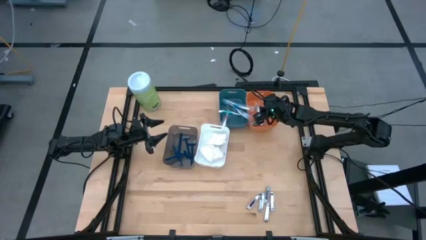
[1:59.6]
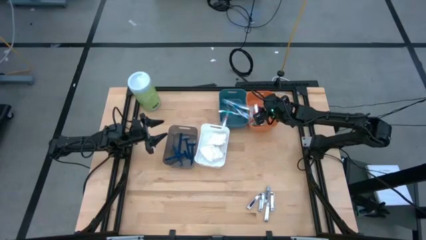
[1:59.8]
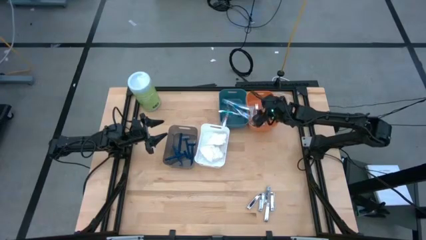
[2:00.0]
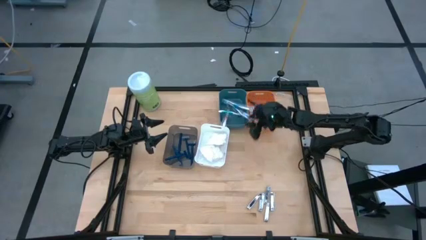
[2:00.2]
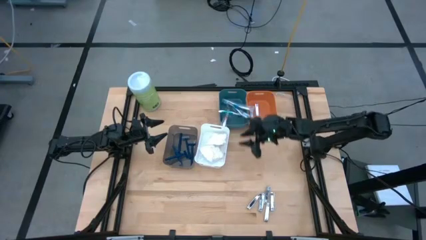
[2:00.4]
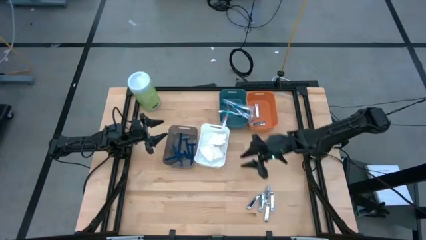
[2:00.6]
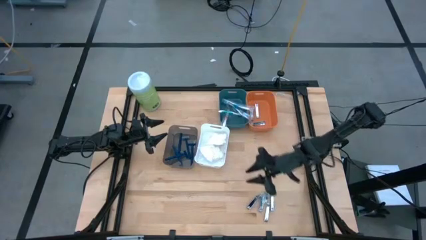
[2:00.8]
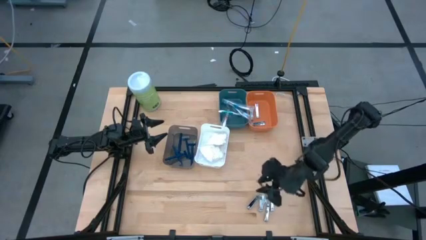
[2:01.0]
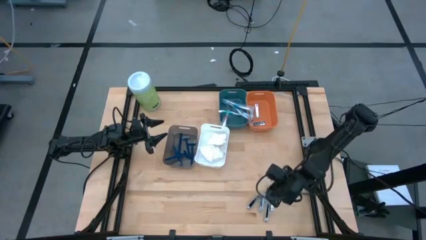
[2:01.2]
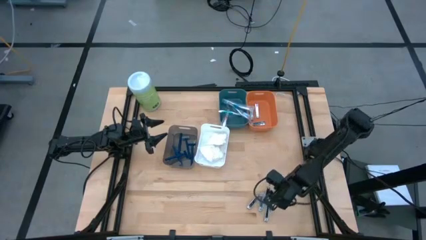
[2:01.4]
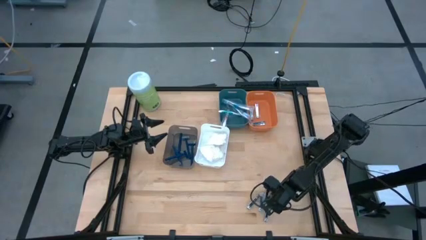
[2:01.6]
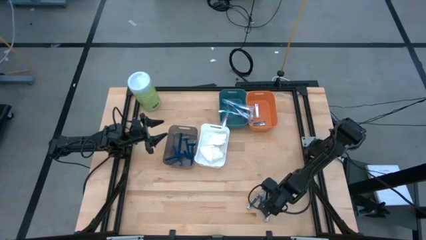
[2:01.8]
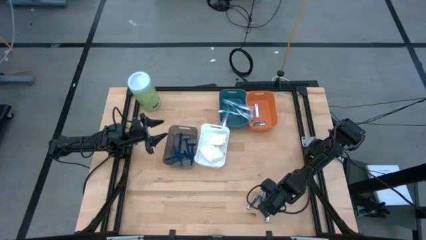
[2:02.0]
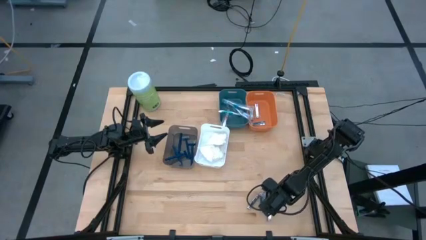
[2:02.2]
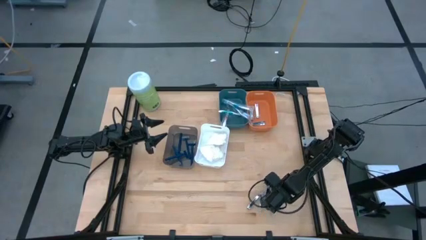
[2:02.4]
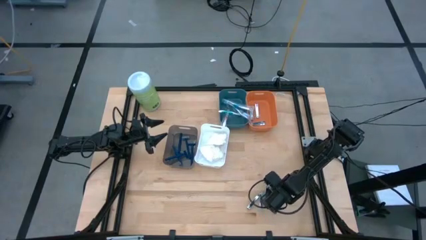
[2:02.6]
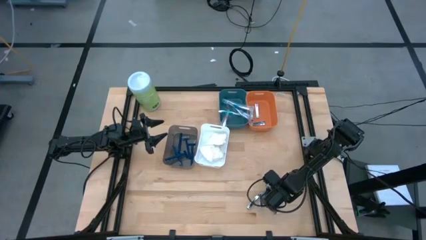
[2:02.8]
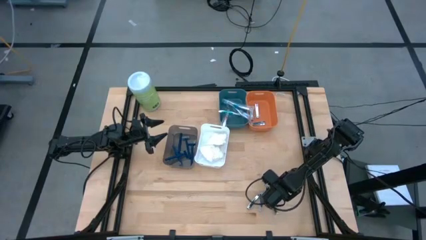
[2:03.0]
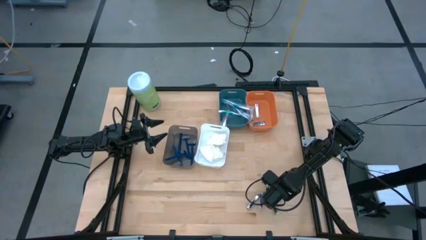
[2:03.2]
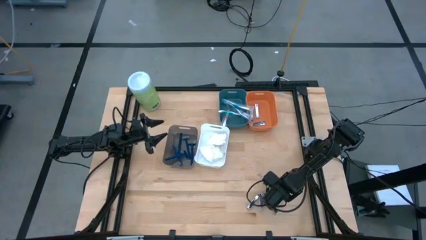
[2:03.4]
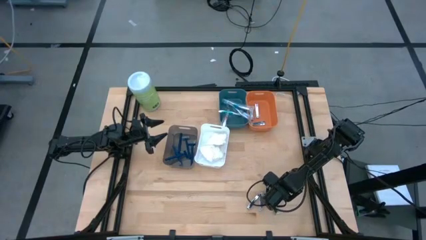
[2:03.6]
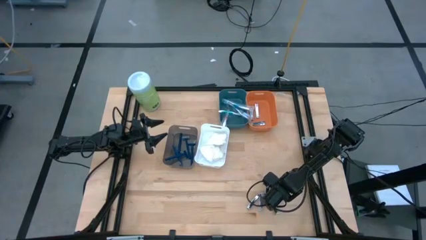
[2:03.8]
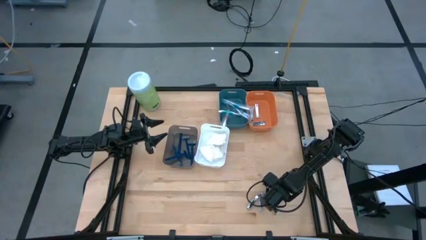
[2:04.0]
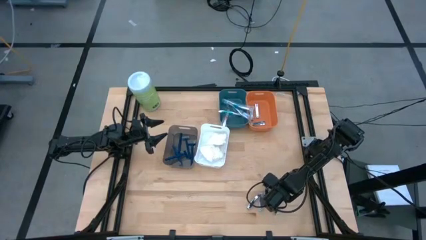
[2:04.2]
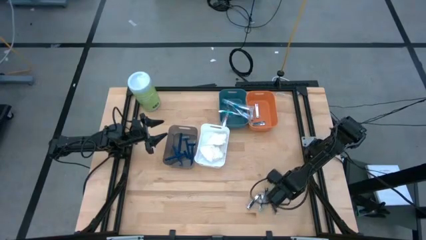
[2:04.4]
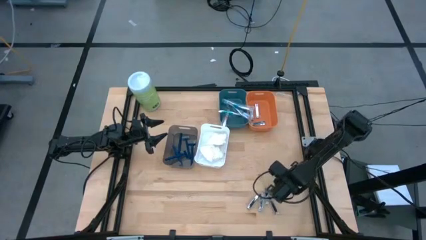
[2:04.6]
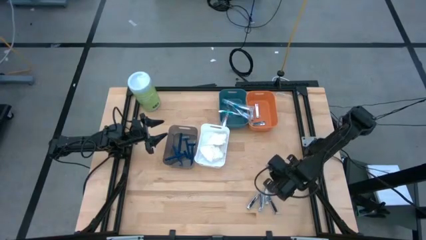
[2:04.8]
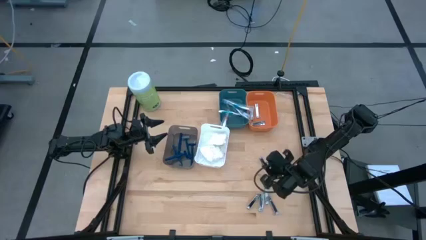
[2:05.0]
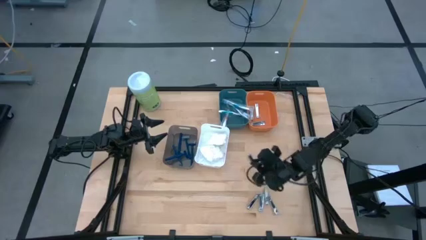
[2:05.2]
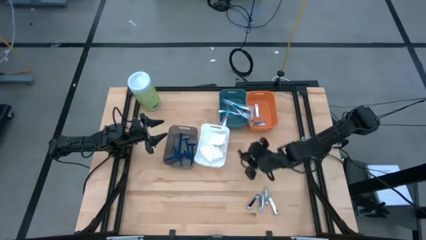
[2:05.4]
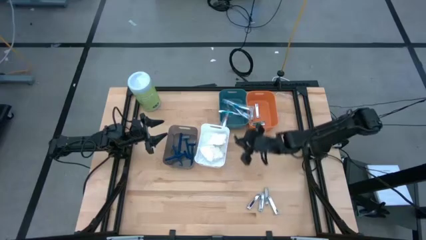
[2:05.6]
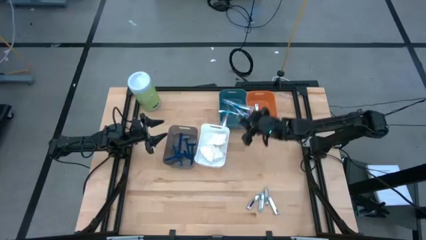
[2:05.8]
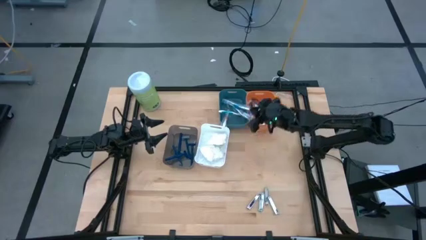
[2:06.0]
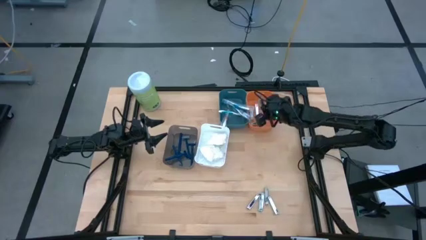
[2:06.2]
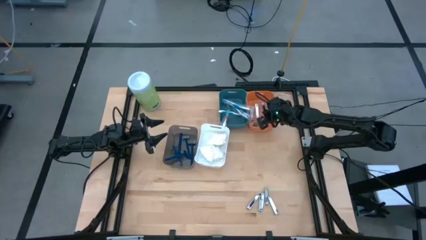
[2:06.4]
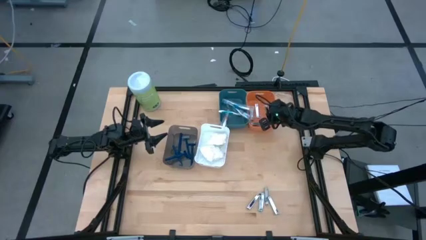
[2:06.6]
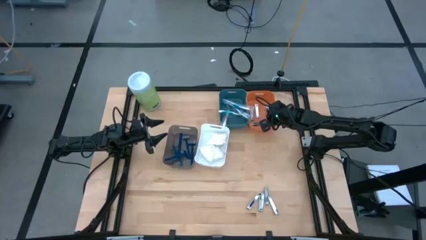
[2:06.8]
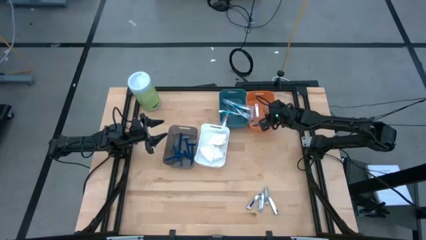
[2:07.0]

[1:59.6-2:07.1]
Task: Pick & Place Travel size toiletries
Put the silver nail cutter into the orange bin

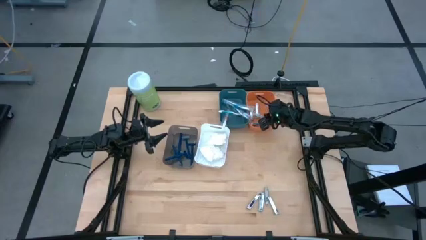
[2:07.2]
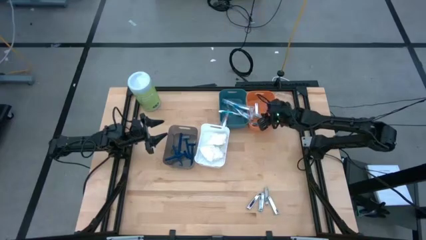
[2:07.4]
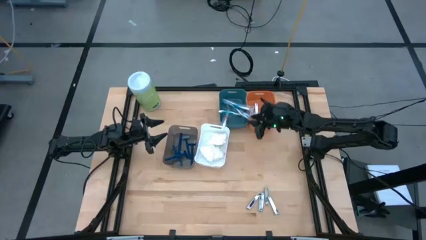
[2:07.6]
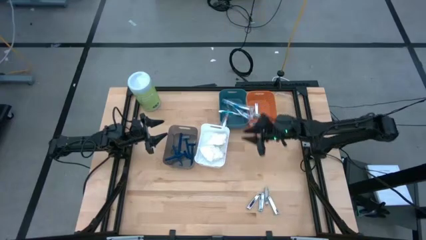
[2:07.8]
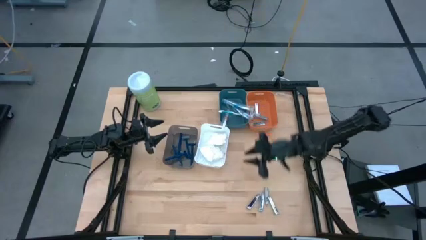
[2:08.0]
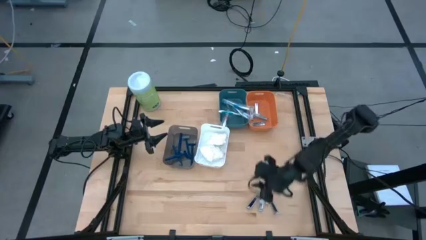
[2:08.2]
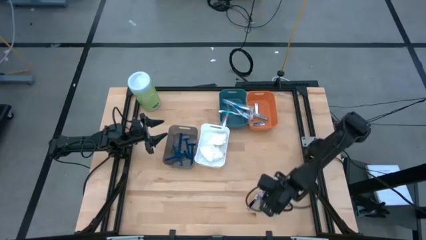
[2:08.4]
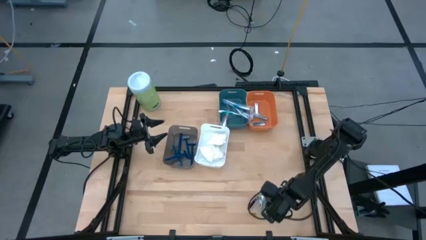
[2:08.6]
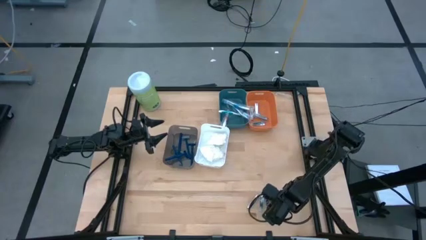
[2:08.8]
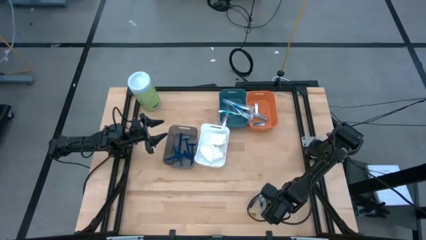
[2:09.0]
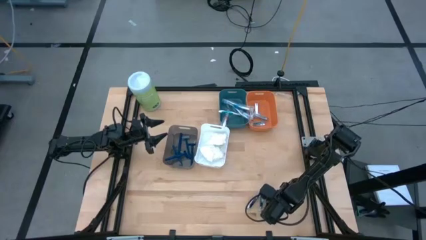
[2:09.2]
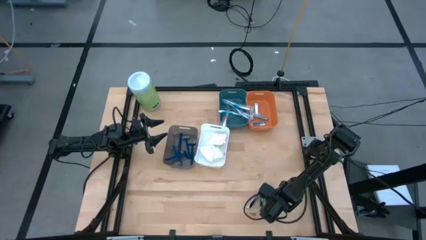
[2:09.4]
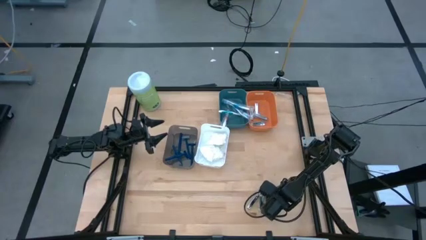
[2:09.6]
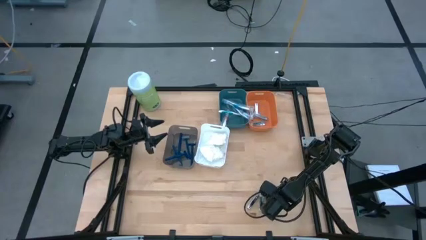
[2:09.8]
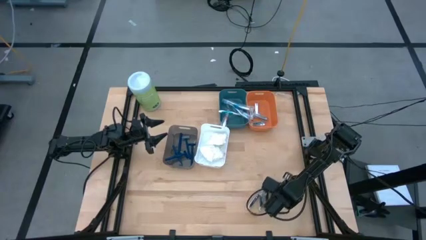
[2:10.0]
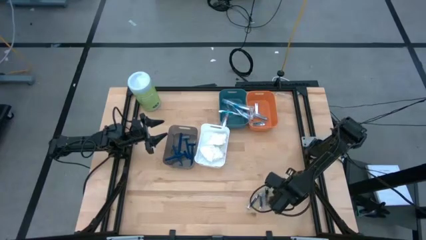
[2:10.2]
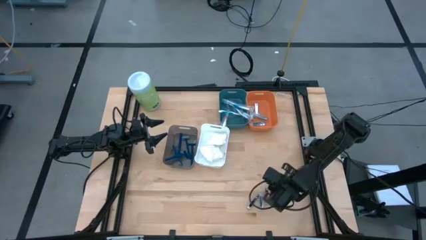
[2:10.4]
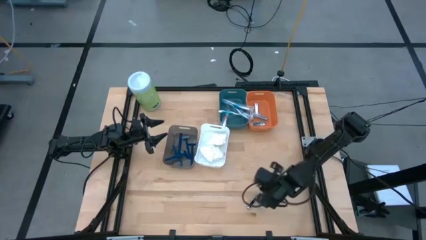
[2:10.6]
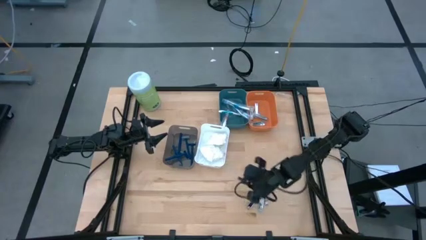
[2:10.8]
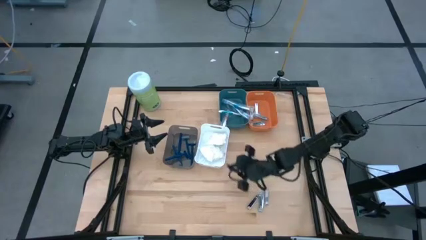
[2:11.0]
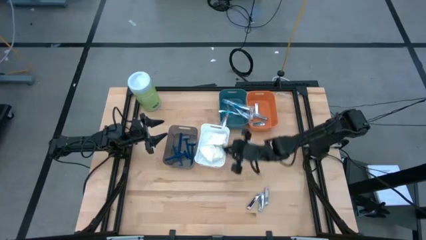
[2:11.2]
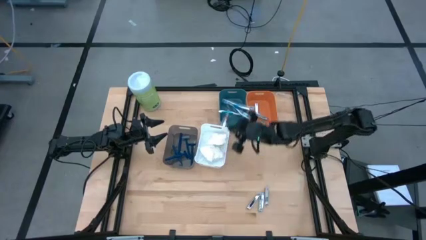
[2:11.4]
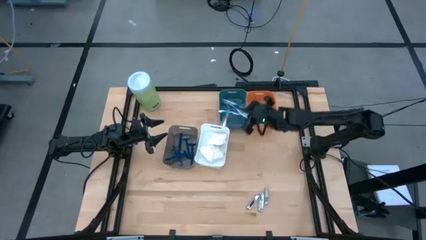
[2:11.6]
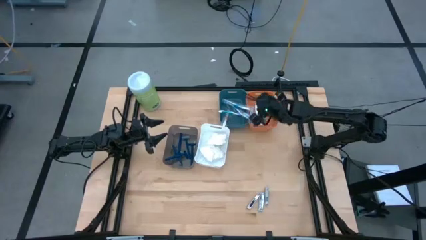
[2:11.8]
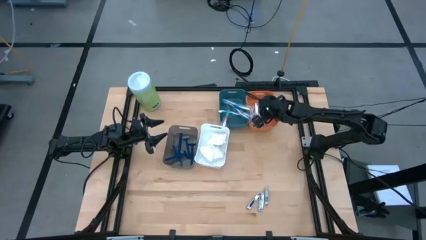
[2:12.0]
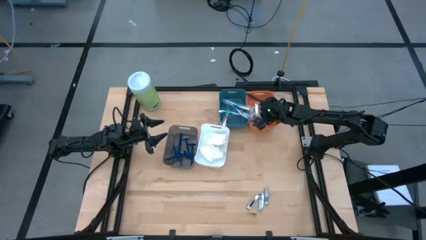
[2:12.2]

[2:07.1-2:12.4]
Put the silver nail cutter into the orange bin

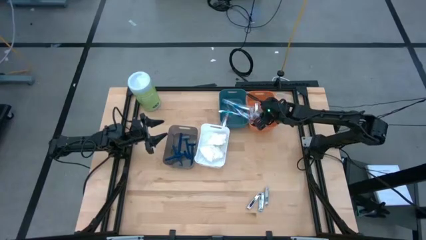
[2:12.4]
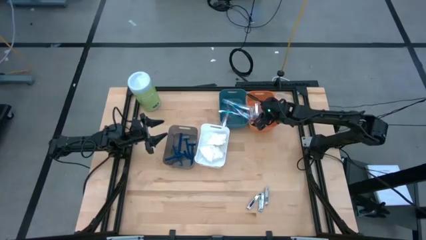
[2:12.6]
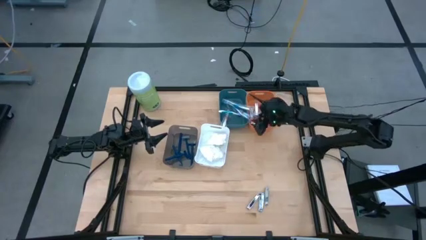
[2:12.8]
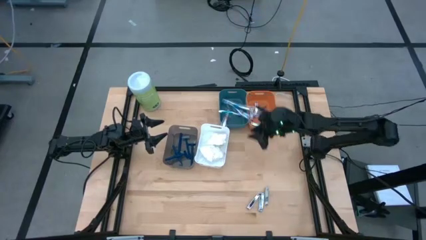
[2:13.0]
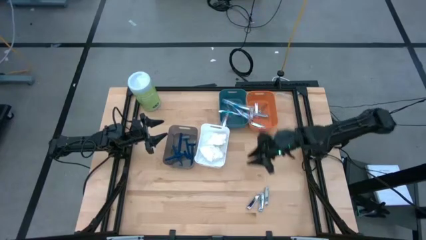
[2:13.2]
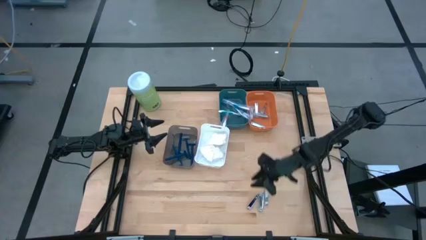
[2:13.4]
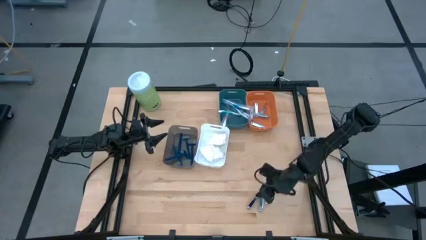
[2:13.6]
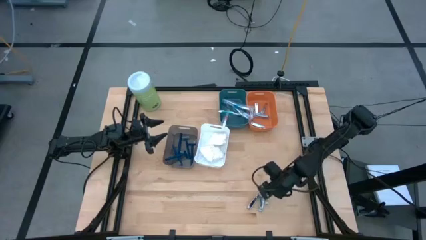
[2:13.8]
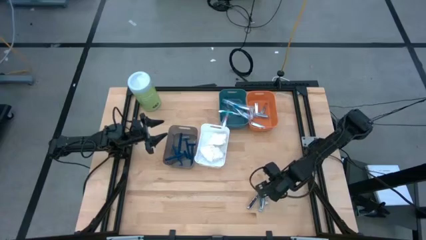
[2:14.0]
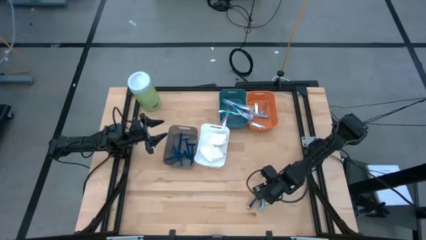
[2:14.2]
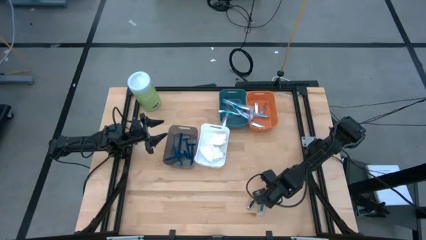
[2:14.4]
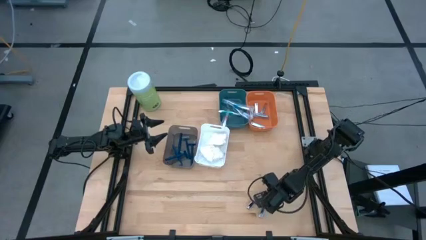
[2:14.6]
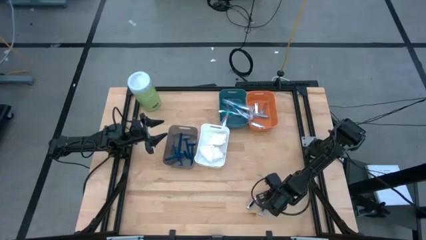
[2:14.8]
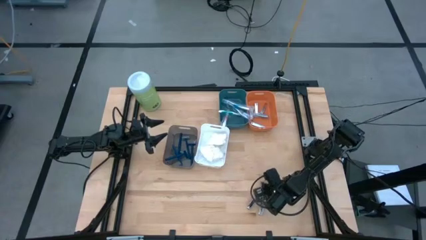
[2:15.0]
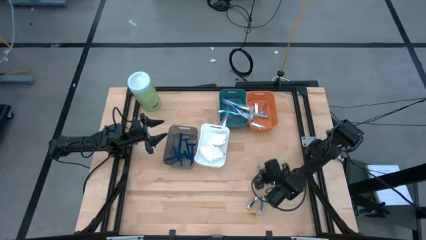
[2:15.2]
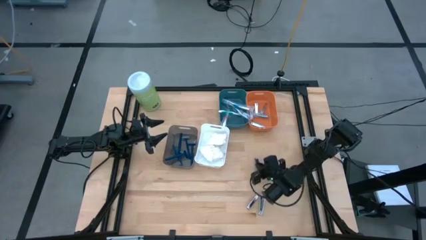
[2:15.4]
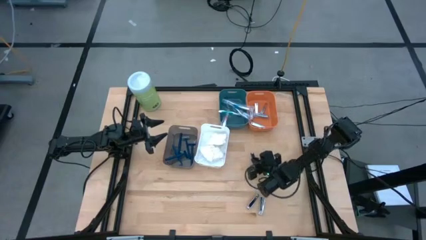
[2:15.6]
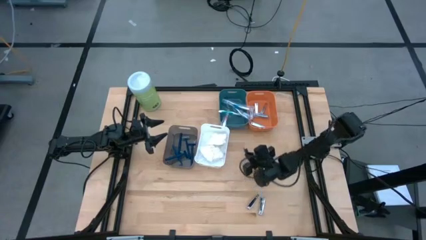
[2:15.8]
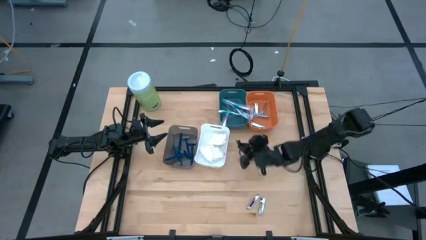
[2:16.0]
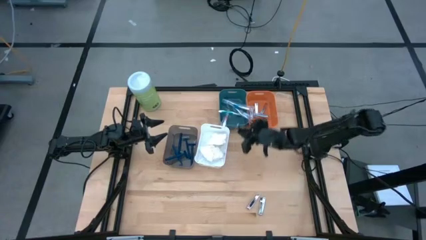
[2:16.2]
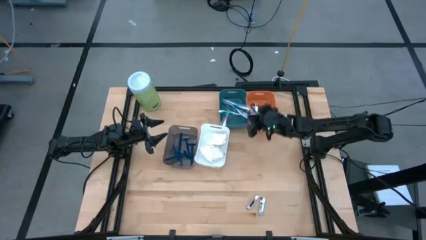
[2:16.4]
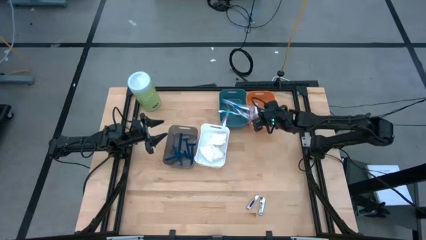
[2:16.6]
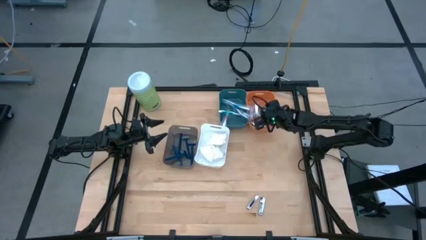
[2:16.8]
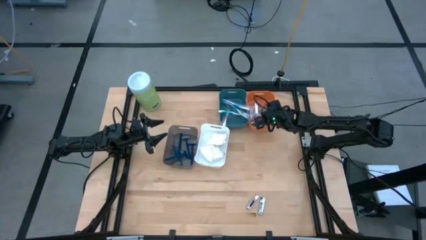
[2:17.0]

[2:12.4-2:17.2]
Put the silver nail cutter into the orange bin
